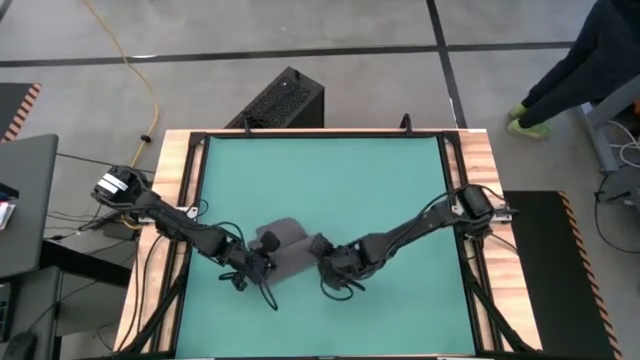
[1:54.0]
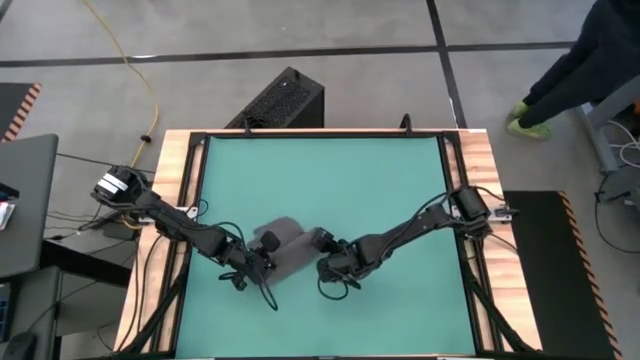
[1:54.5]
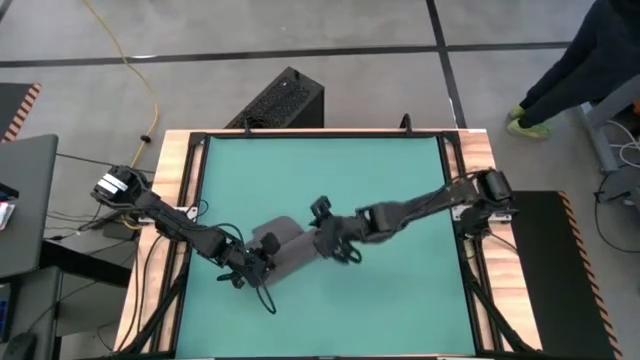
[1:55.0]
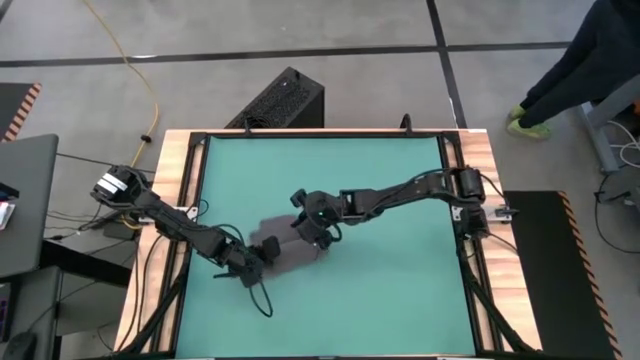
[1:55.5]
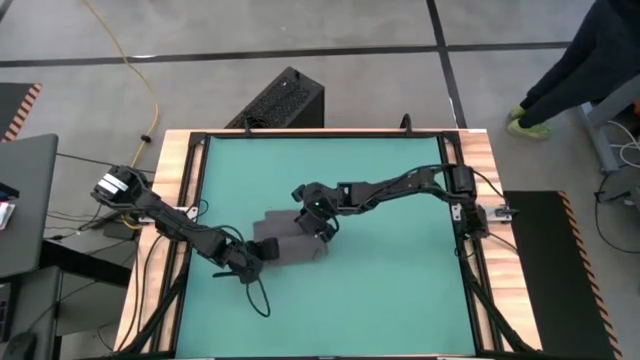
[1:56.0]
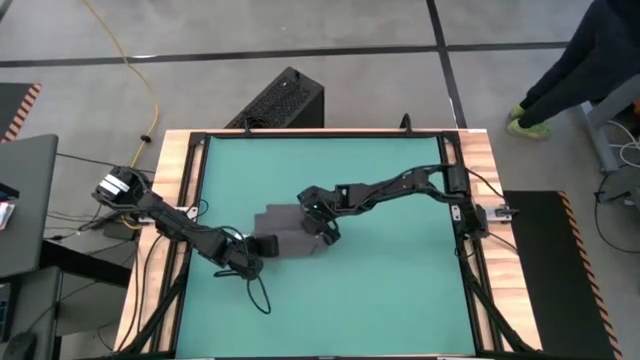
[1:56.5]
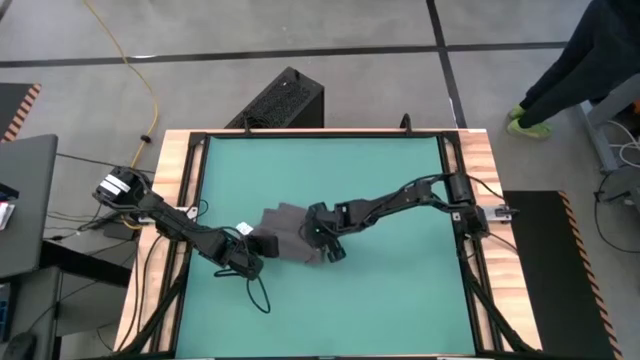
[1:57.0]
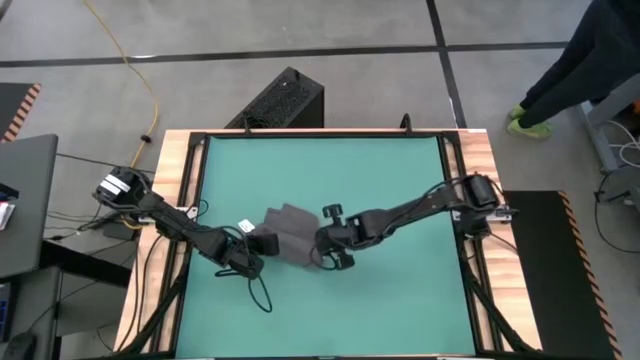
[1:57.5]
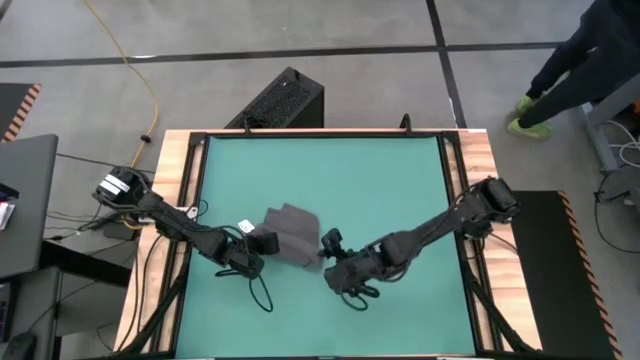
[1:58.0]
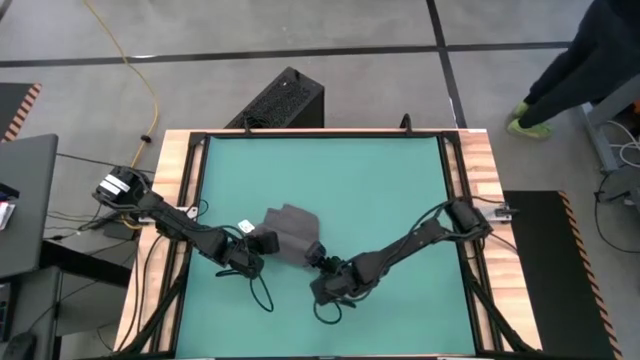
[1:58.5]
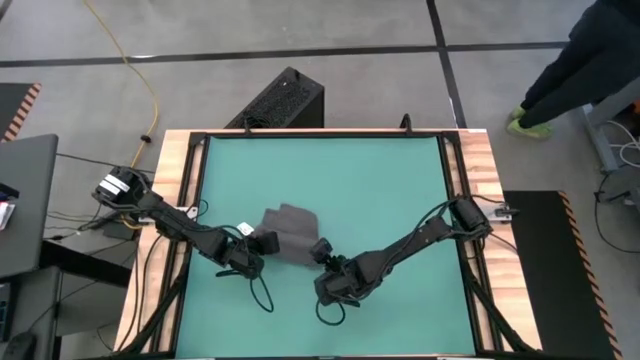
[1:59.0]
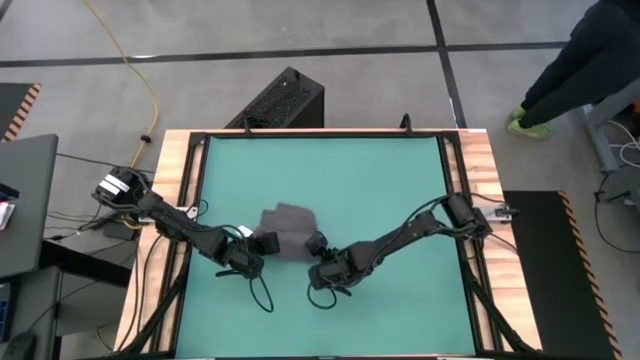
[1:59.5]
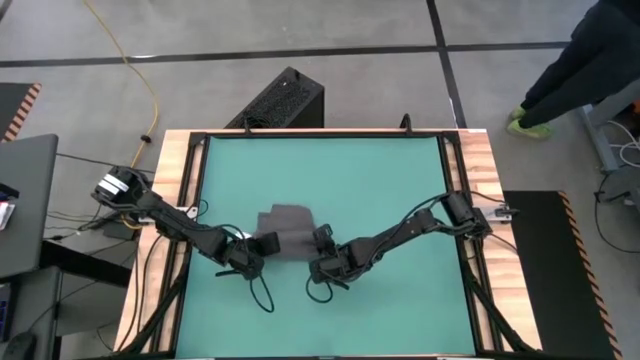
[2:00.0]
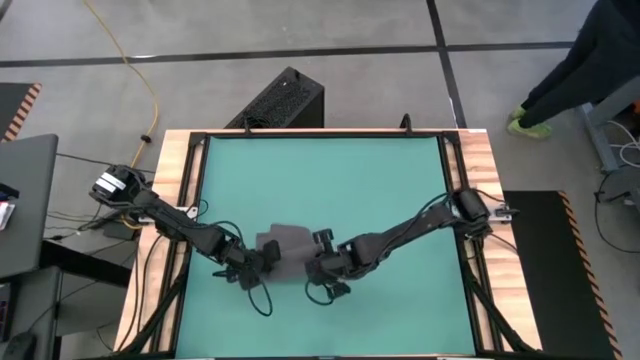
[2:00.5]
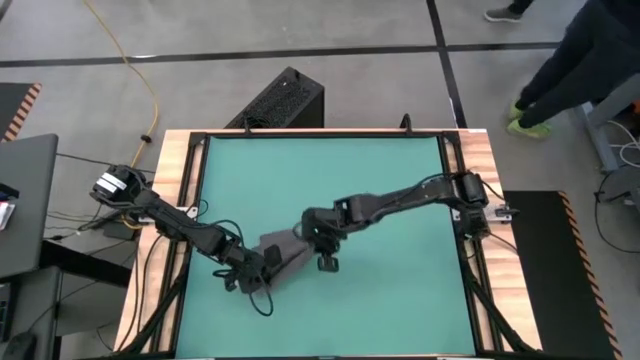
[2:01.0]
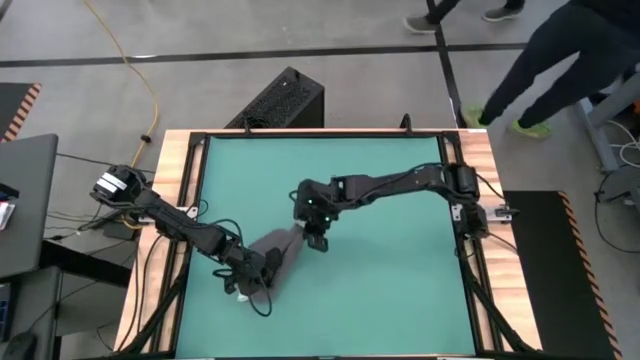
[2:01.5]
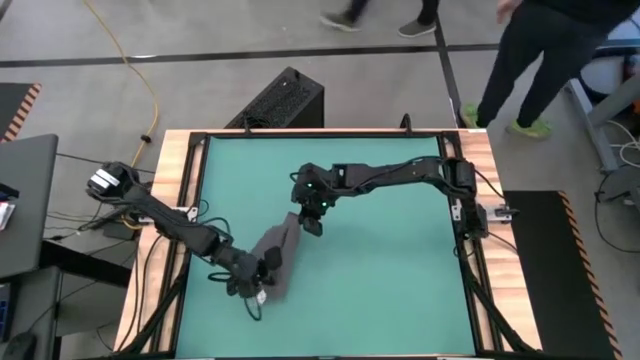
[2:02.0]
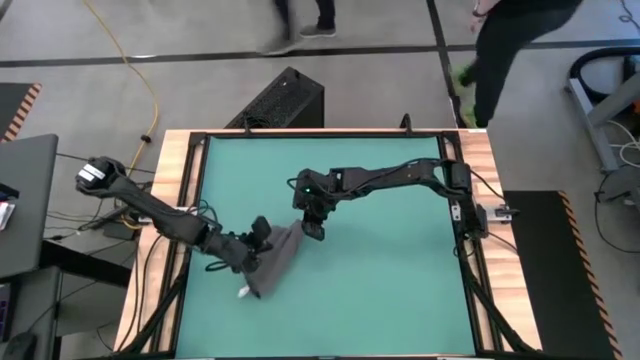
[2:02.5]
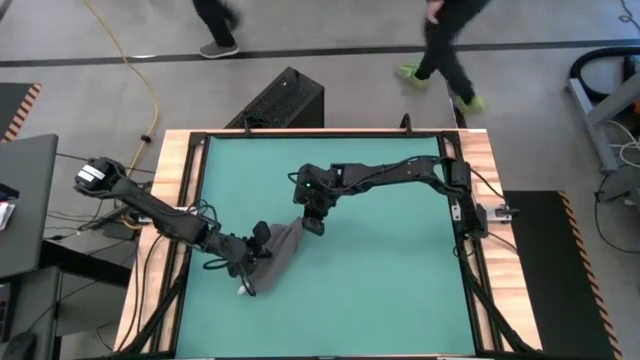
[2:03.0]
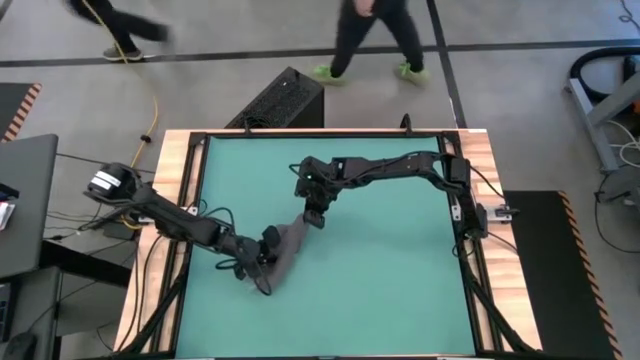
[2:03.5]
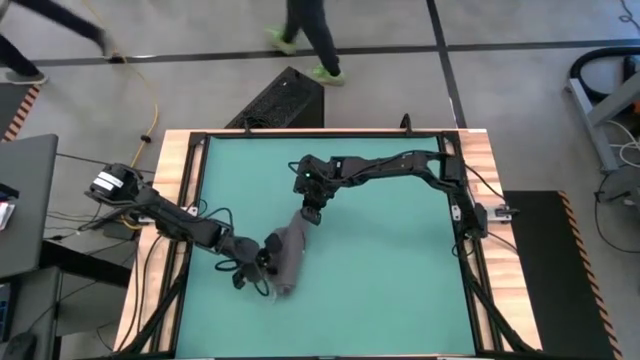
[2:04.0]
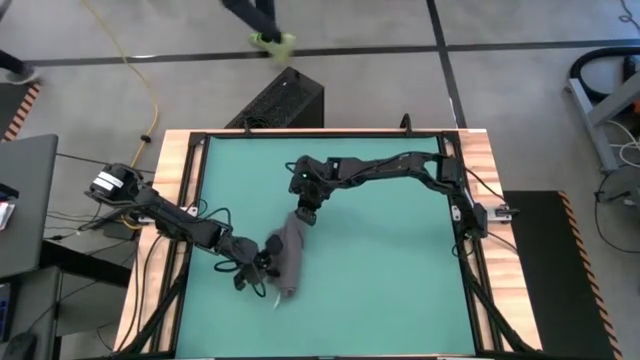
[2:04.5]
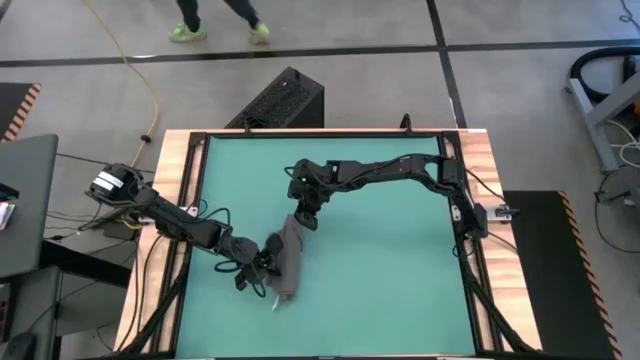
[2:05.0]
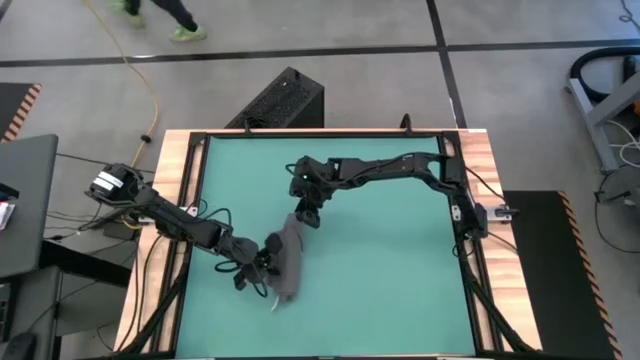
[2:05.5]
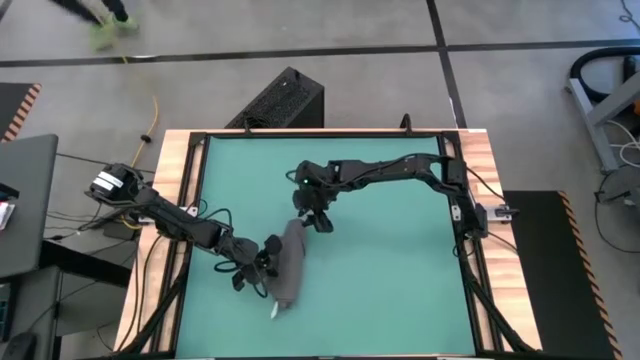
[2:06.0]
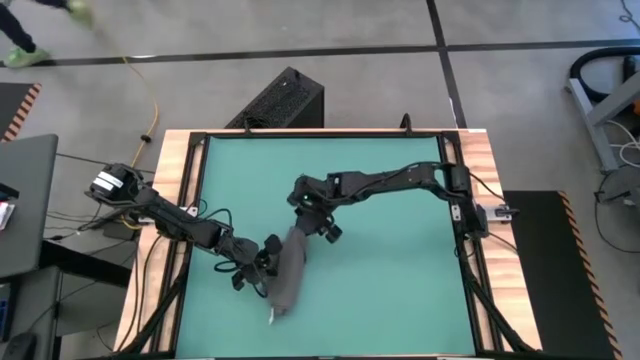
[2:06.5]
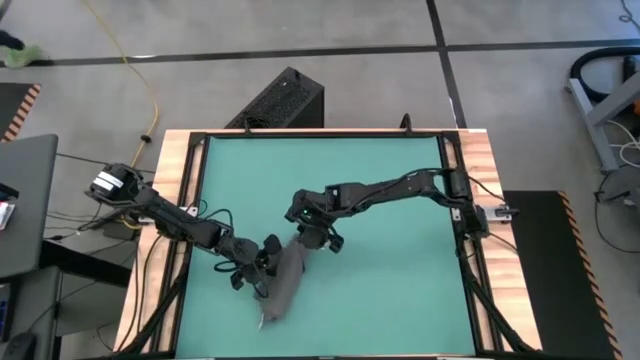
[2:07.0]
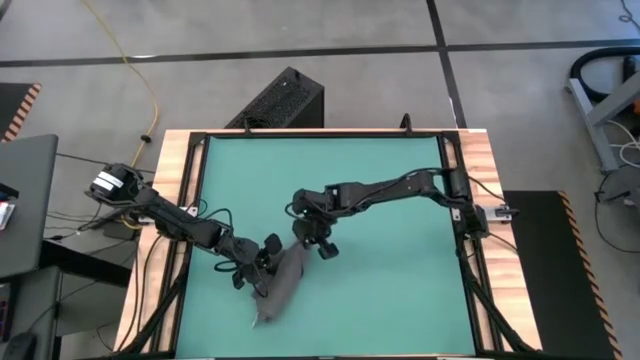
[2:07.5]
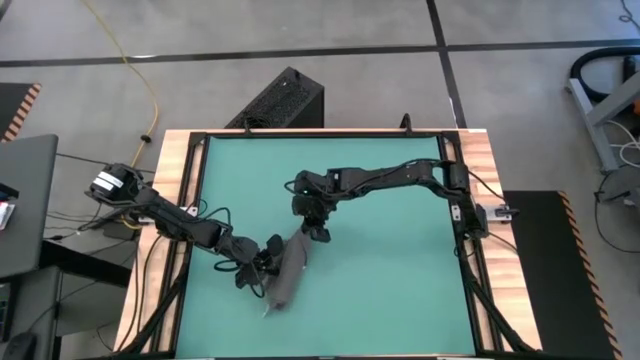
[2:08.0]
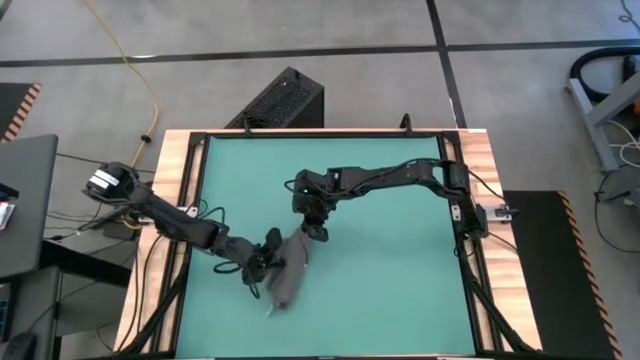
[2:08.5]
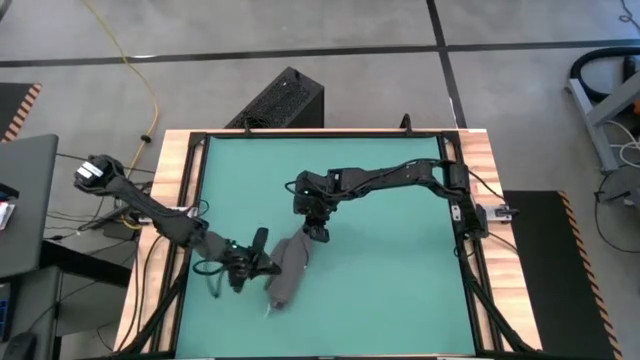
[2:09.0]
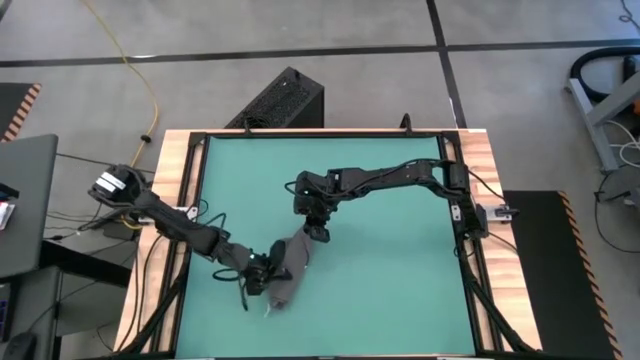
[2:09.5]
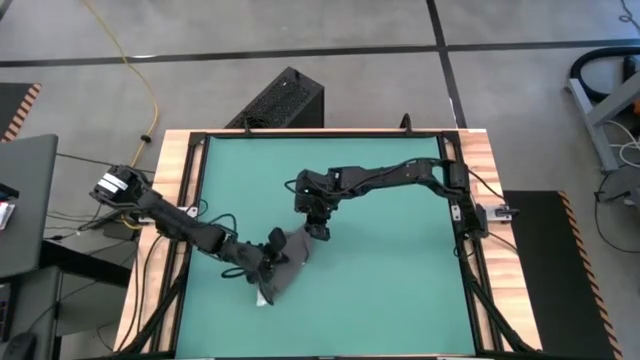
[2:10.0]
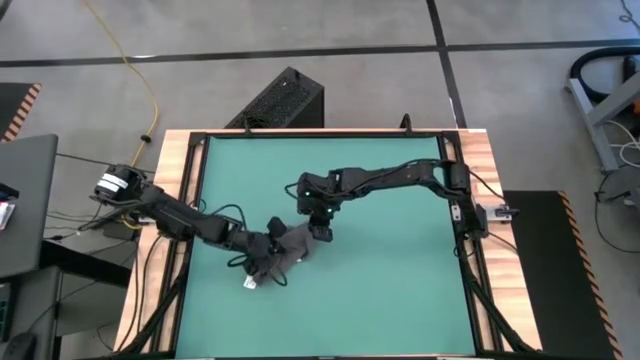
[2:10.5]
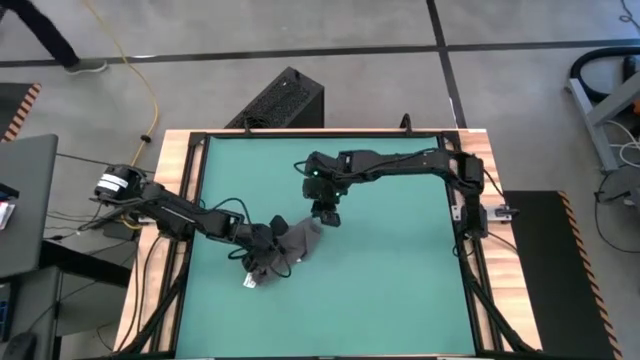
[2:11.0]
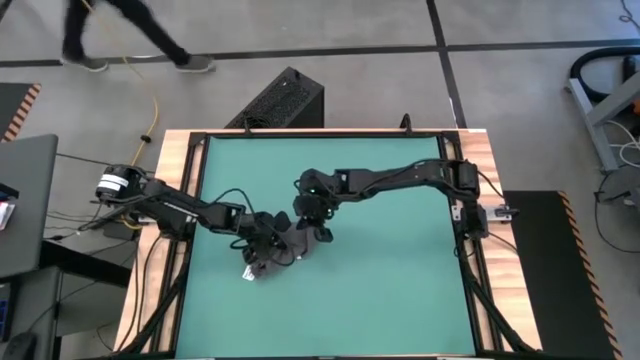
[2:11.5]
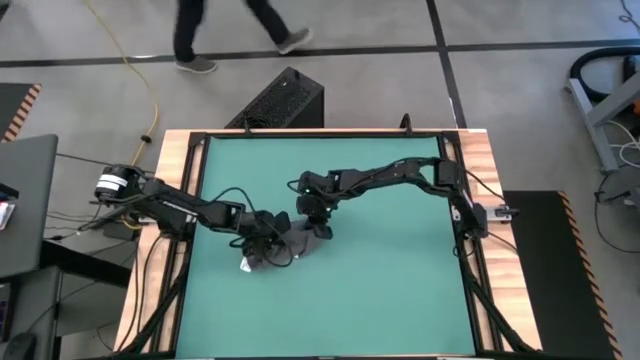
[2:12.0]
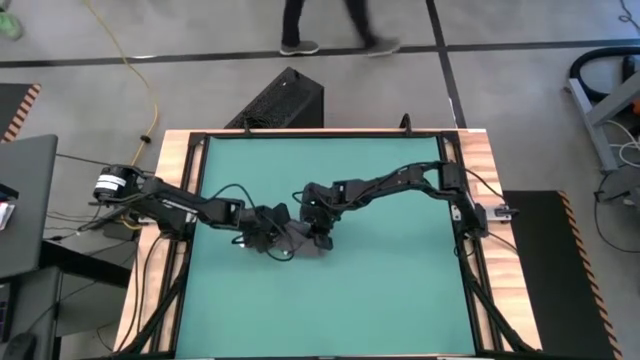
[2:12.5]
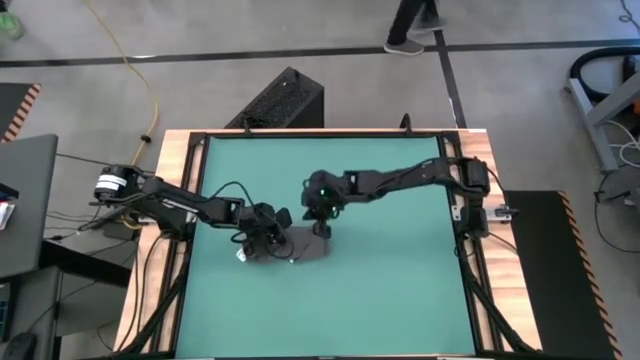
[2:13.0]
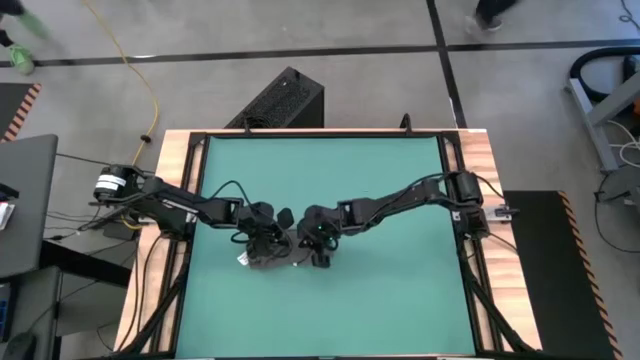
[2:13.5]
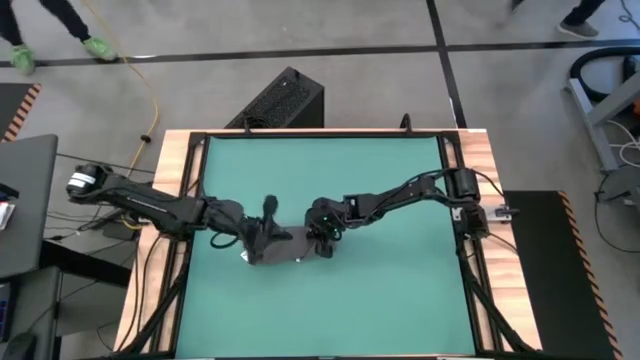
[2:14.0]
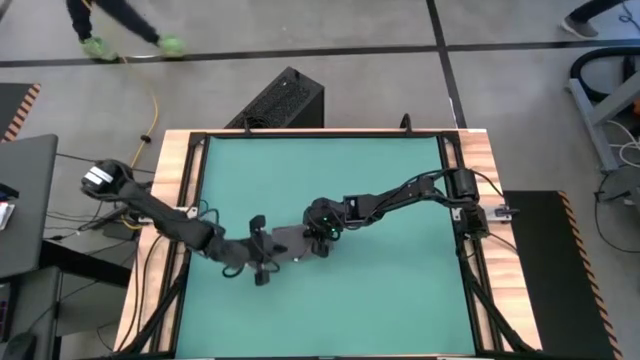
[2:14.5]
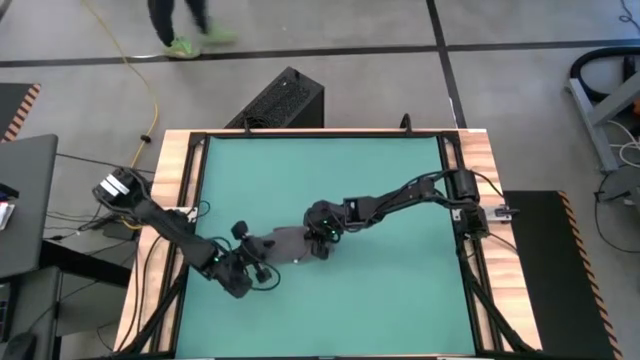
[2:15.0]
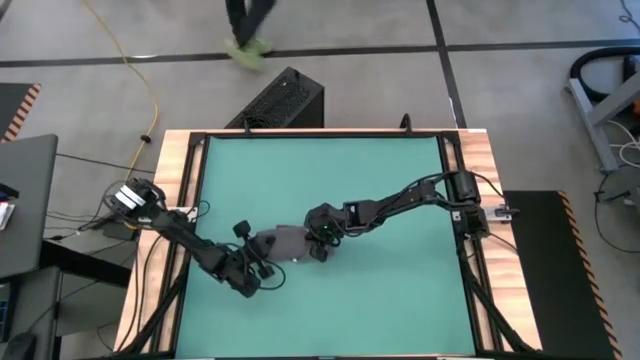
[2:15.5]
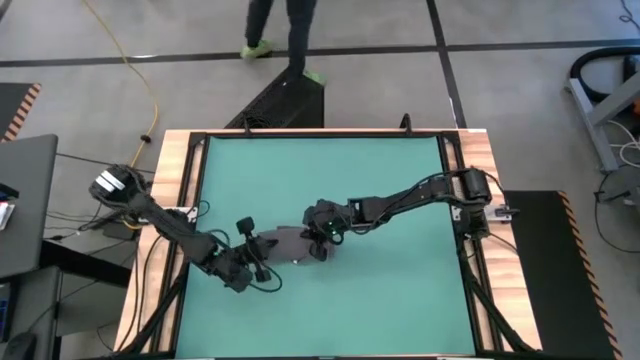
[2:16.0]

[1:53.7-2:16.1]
Task: Roll towel into tight, uniform cylinder
Roll the gray towel
